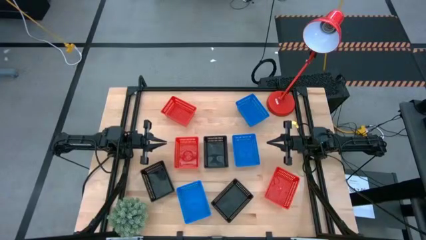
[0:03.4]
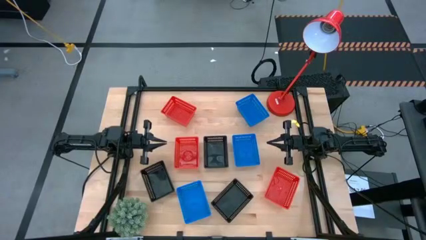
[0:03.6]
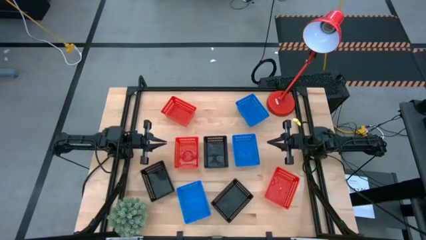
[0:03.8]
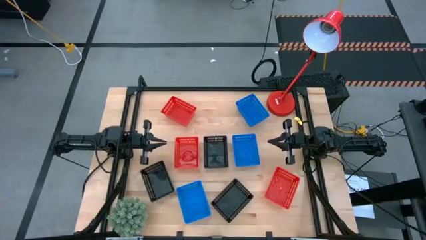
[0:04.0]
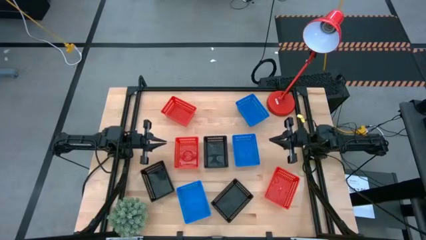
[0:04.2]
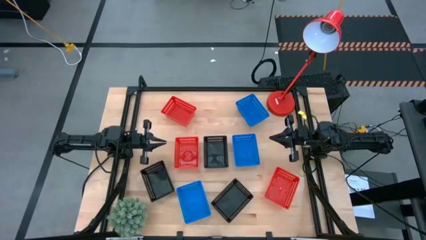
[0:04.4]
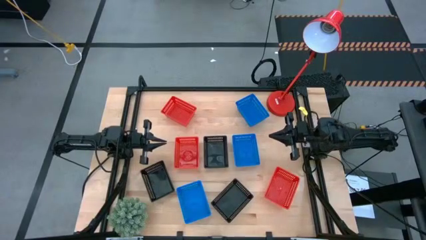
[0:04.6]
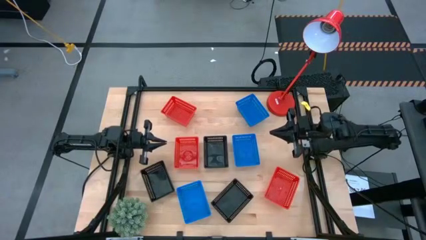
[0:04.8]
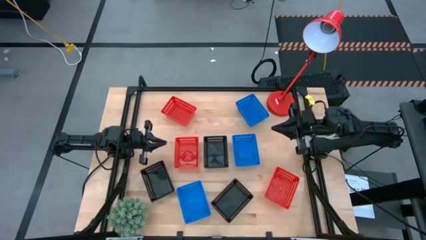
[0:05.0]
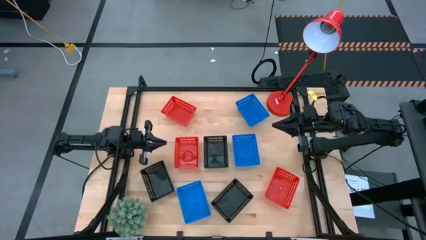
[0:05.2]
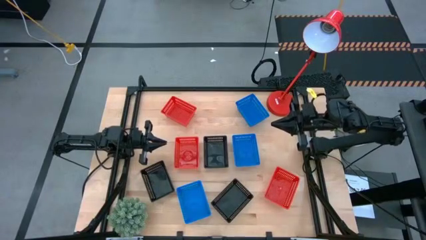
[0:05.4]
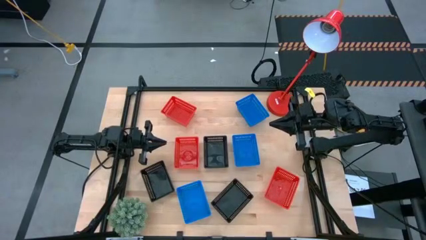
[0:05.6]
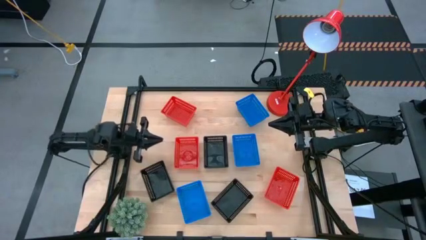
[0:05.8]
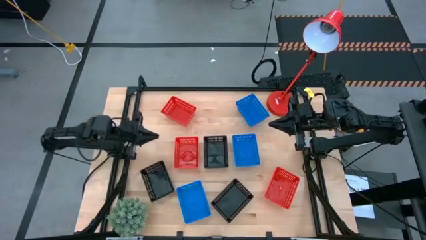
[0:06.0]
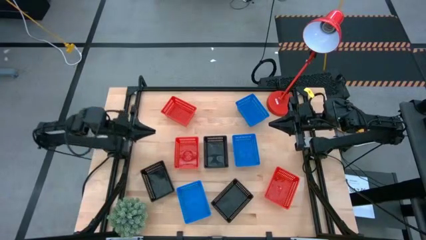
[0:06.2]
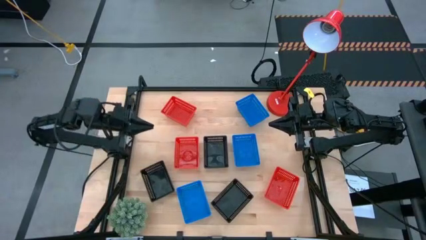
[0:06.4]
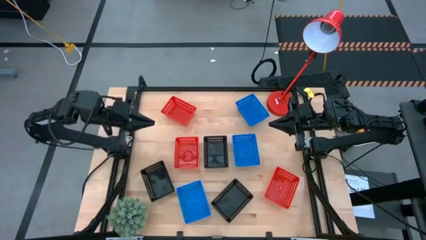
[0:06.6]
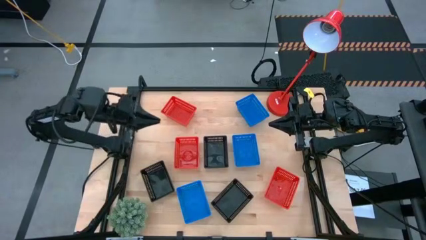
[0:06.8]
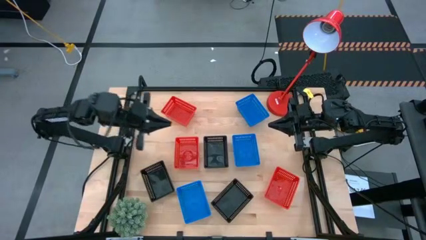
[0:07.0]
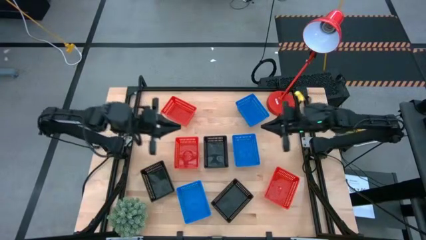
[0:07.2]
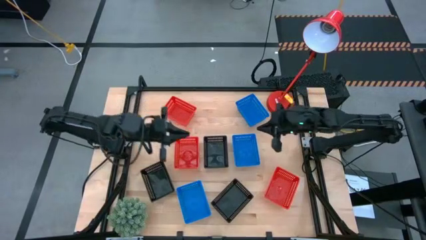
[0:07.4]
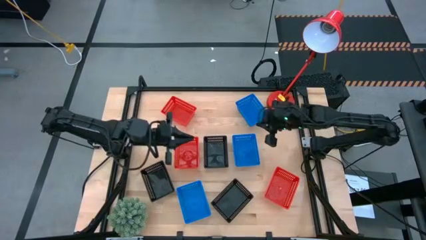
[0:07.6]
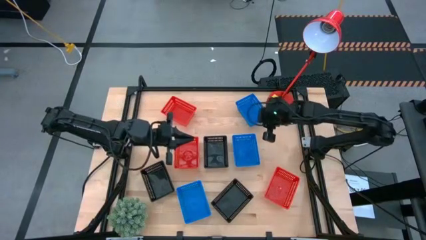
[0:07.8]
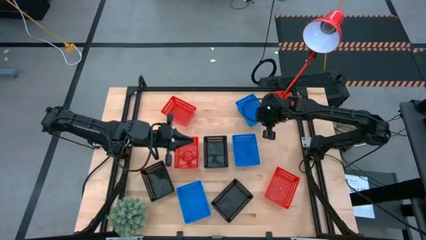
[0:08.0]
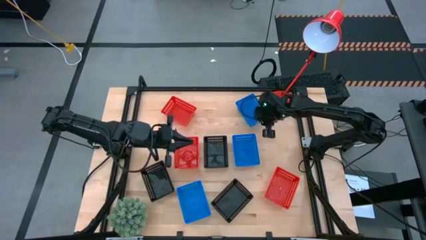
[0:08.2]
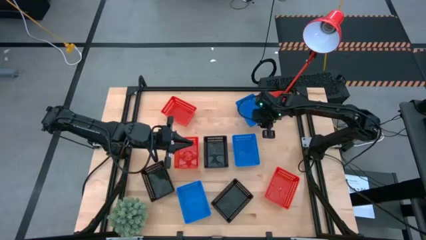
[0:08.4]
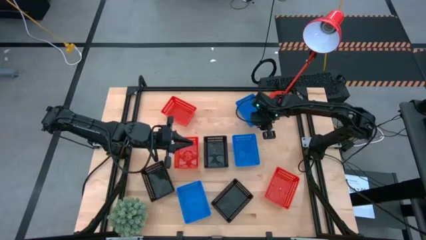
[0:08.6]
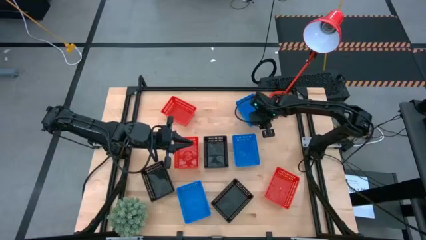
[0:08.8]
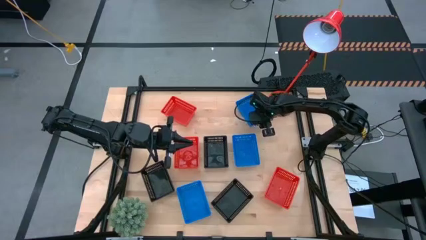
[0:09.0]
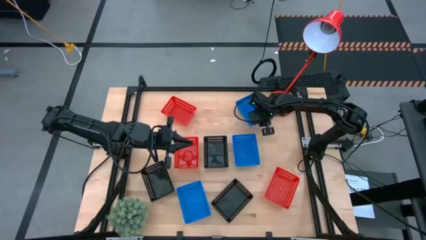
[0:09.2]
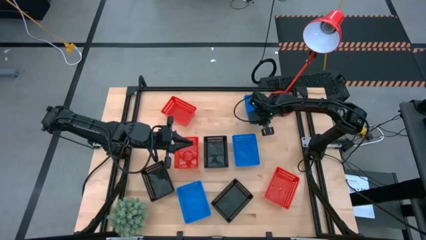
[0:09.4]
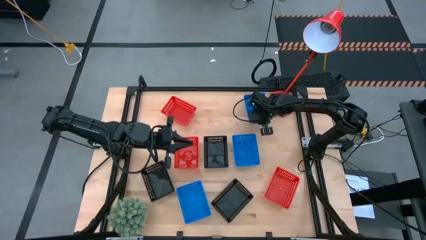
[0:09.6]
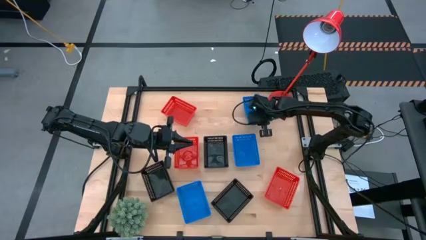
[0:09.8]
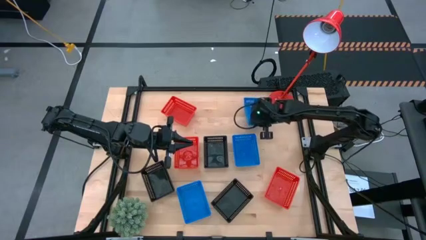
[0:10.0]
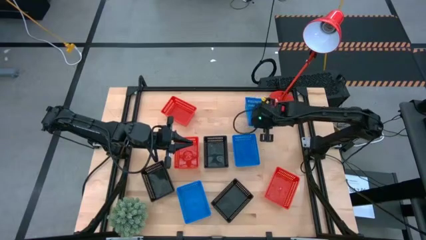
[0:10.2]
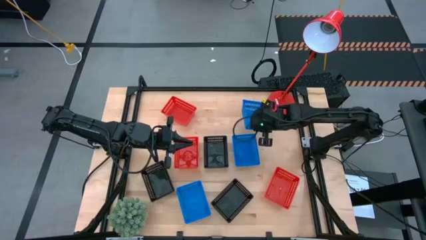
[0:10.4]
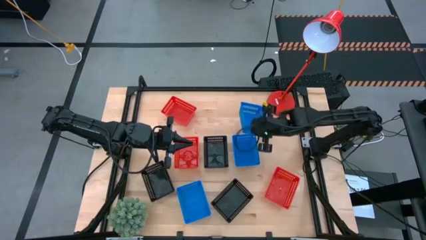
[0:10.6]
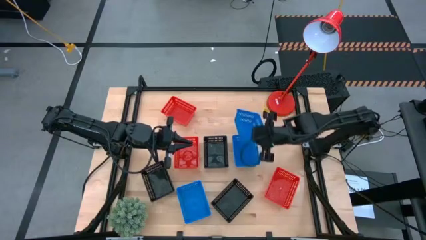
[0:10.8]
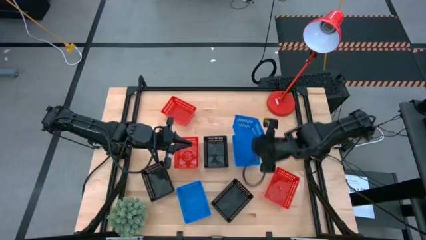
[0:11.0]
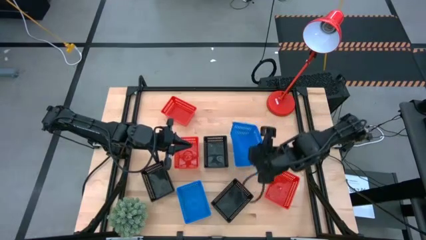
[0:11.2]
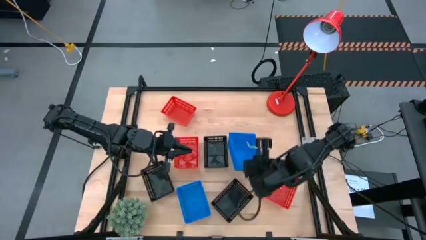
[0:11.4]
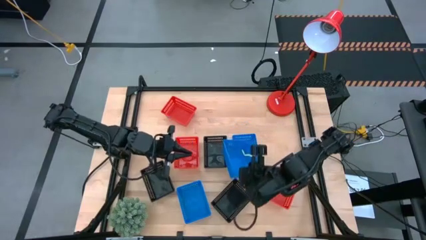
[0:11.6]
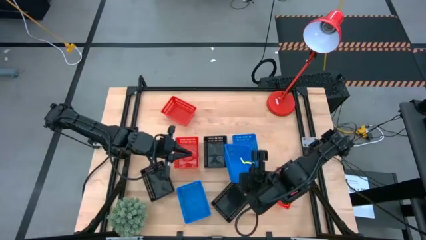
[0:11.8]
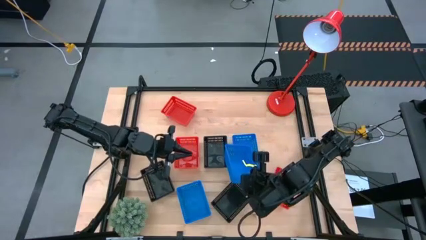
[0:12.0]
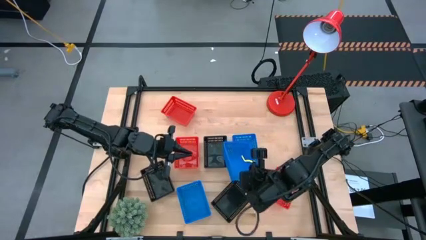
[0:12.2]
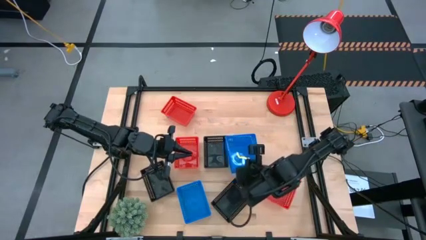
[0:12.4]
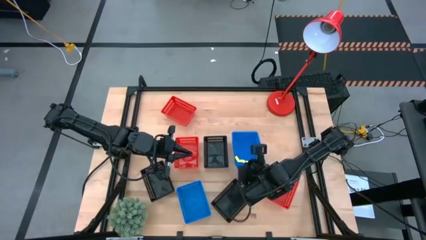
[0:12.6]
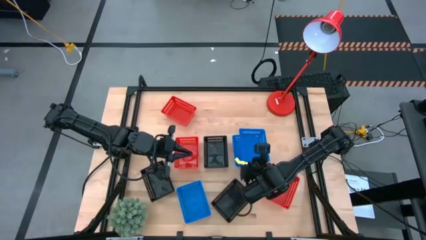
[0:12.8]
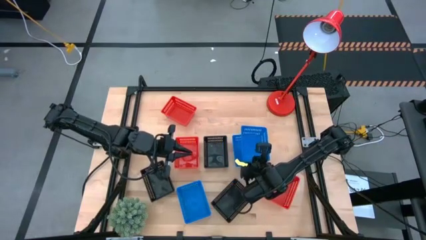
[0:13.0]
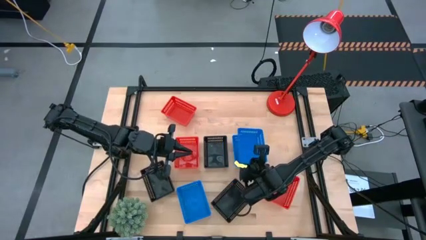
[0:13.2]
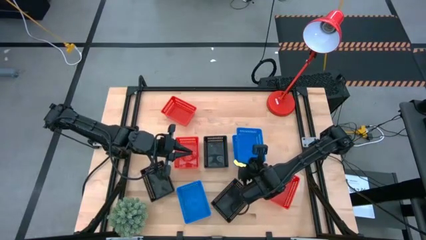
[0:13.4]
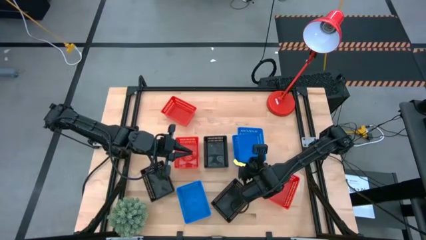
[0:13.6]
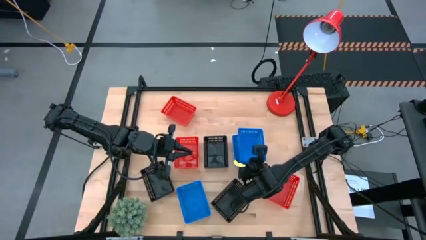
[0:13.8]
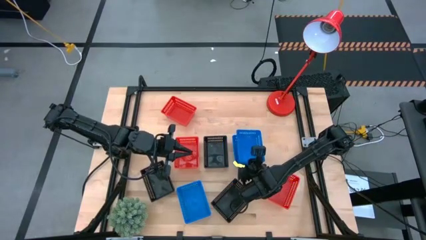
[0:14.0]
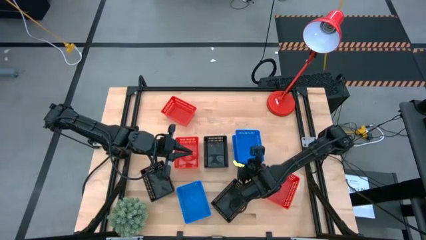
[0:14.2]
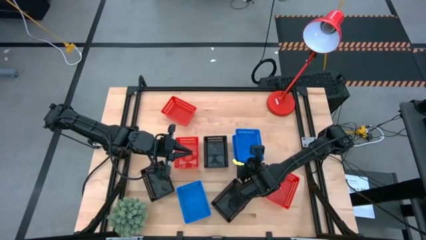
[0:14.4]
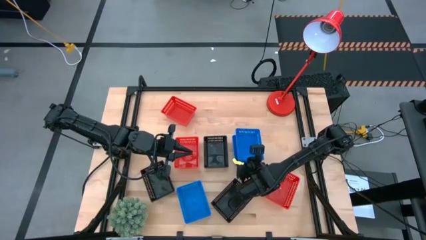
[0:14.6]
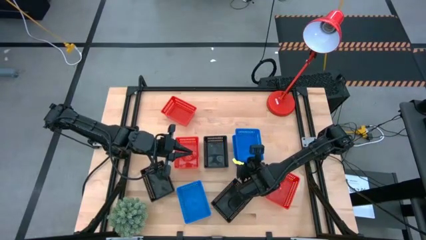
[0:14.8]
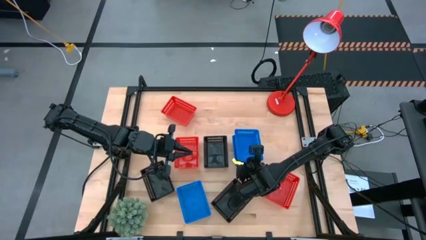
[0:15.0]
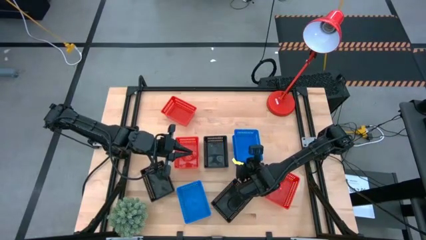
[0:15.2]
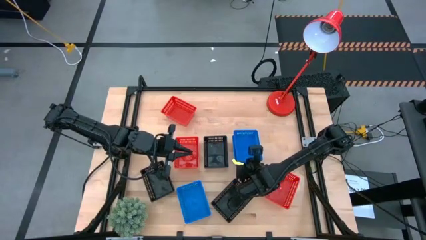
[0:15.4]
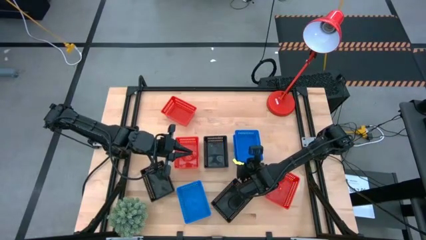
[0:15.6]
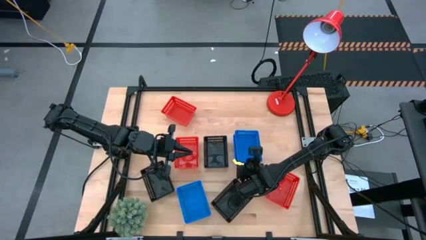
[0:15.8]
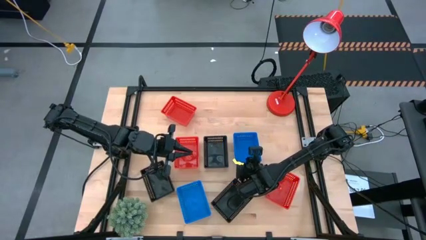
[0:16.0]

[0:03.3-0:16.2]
Stack the top blue bin on the middle blue bin
